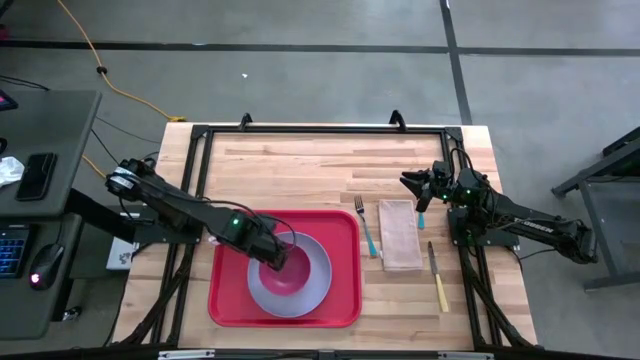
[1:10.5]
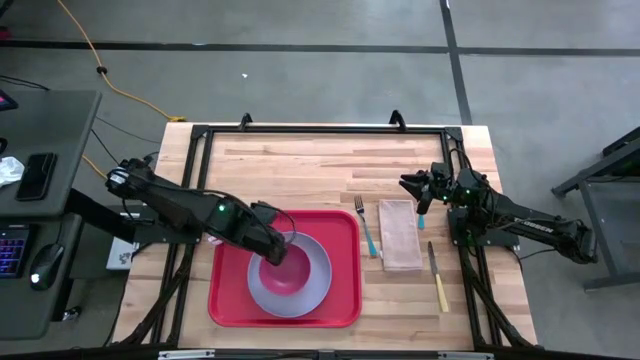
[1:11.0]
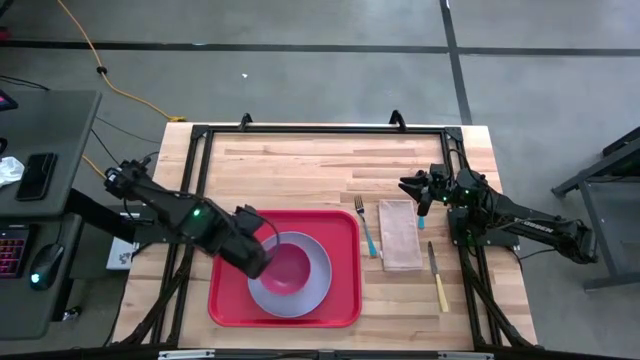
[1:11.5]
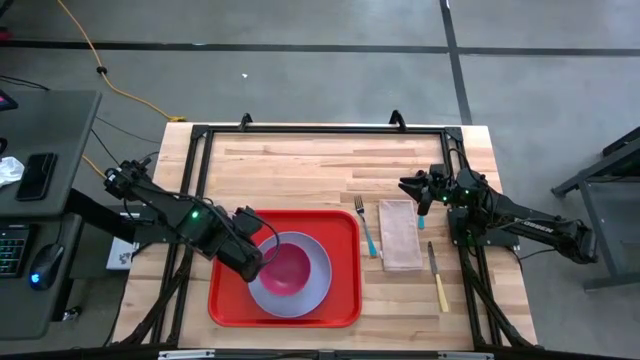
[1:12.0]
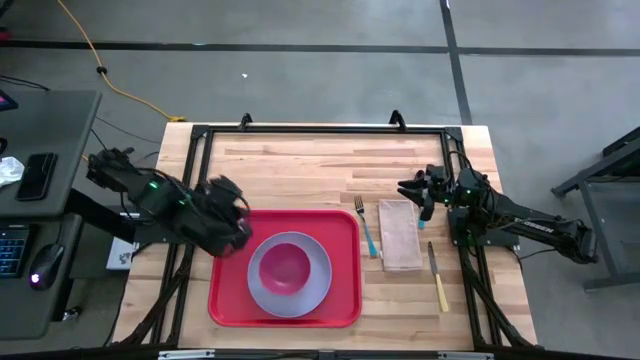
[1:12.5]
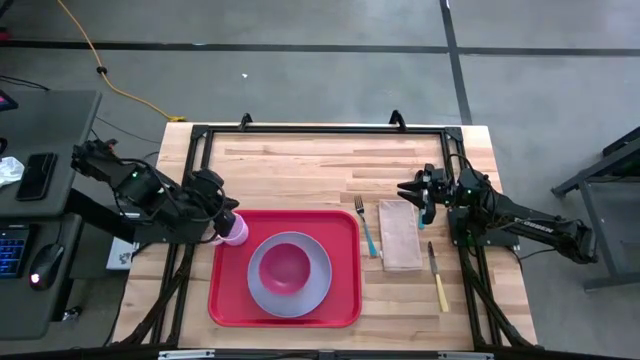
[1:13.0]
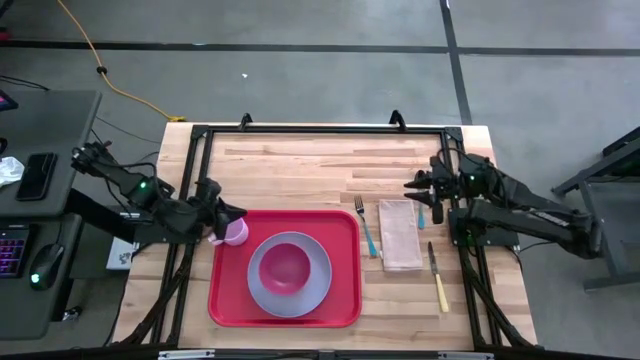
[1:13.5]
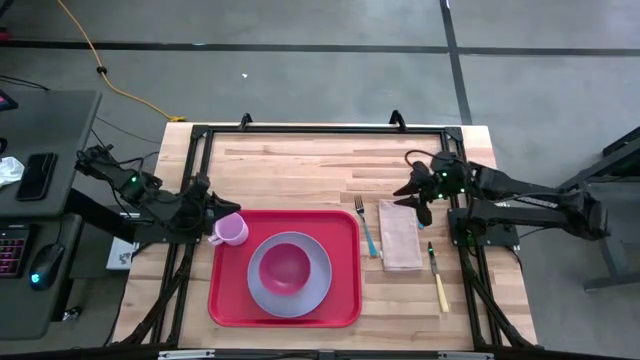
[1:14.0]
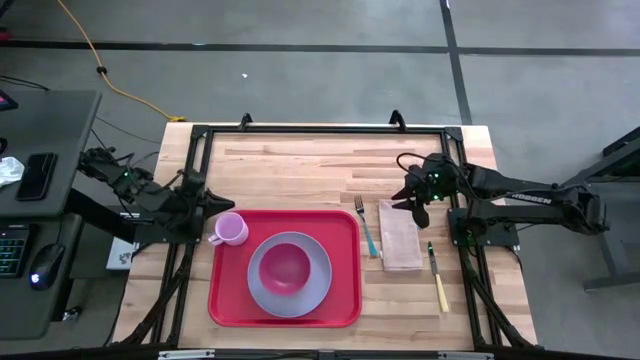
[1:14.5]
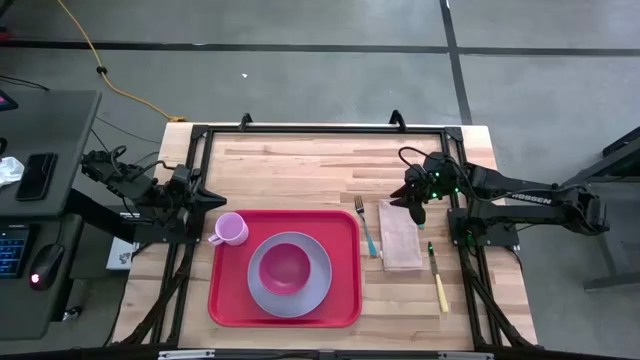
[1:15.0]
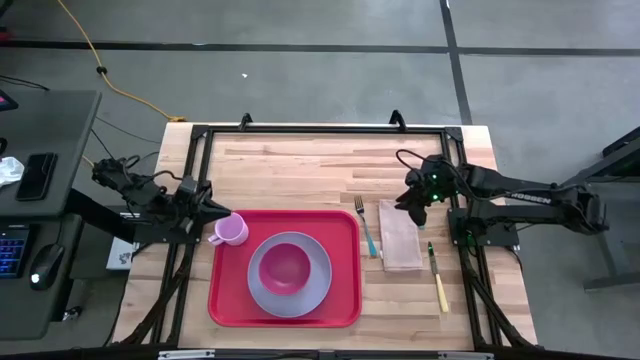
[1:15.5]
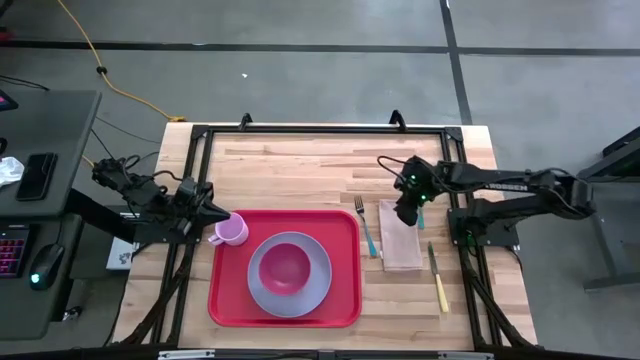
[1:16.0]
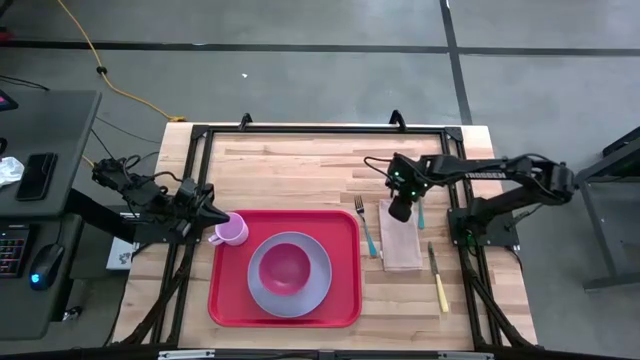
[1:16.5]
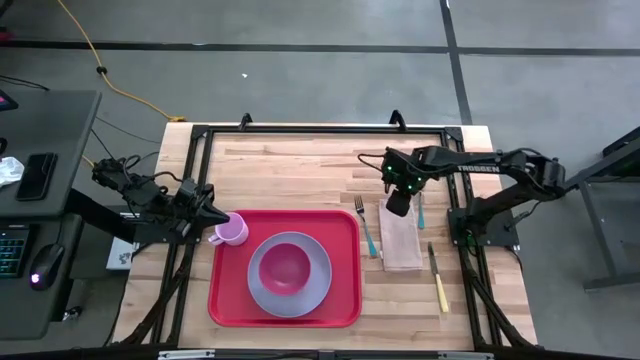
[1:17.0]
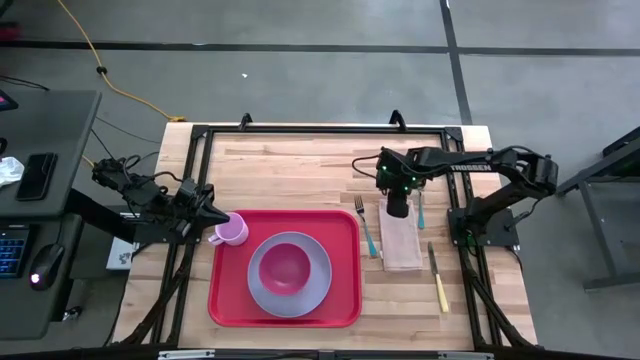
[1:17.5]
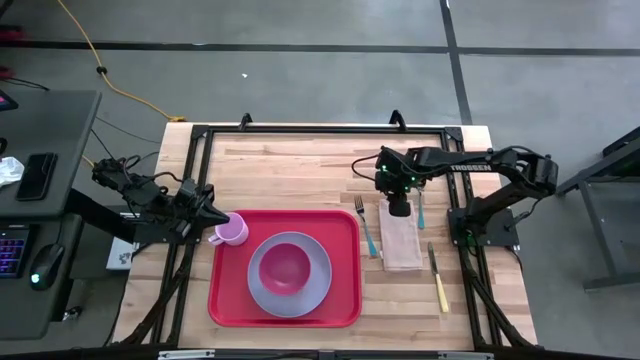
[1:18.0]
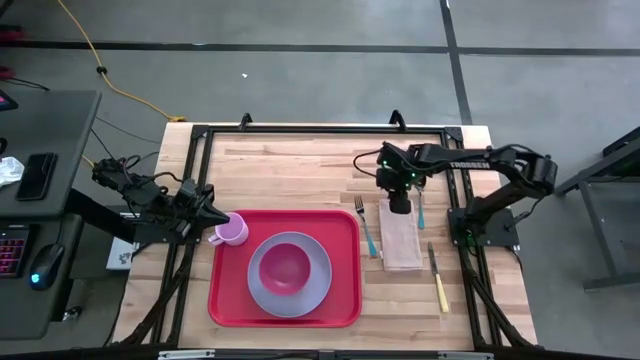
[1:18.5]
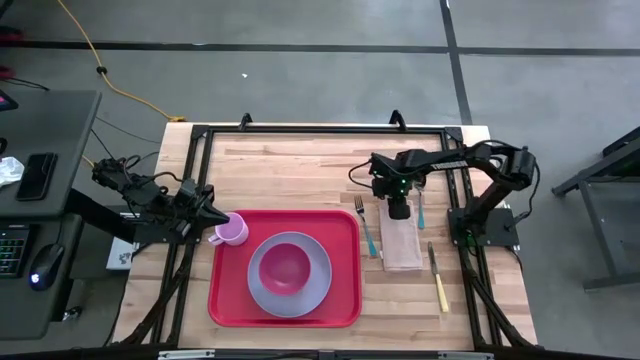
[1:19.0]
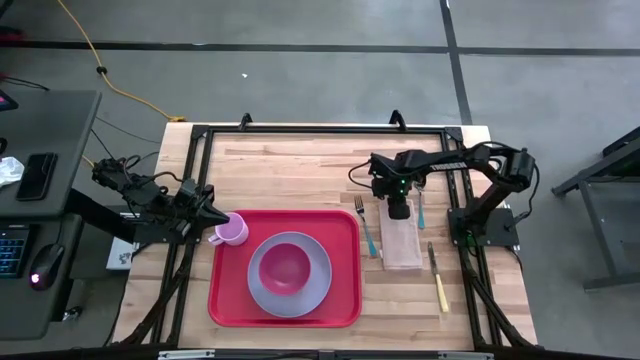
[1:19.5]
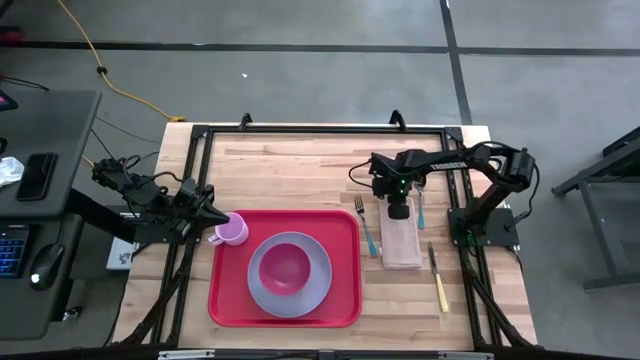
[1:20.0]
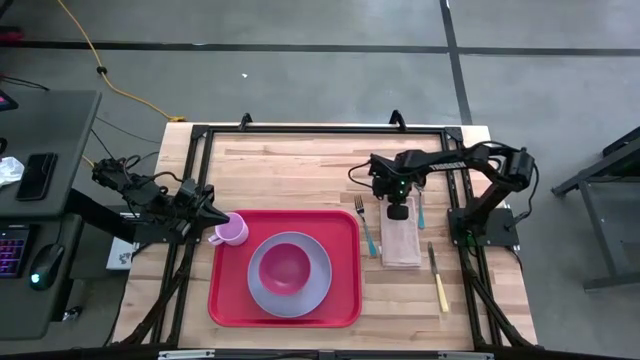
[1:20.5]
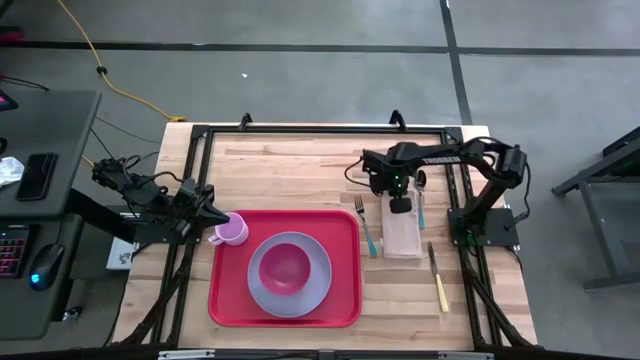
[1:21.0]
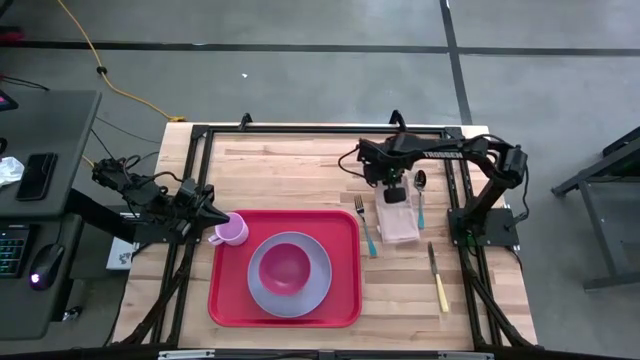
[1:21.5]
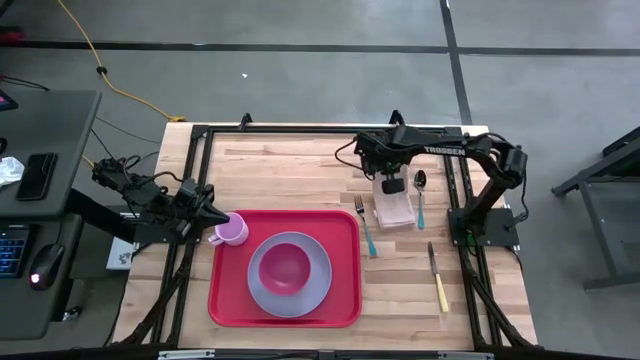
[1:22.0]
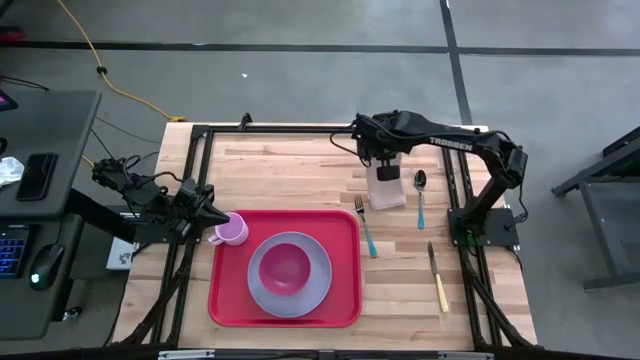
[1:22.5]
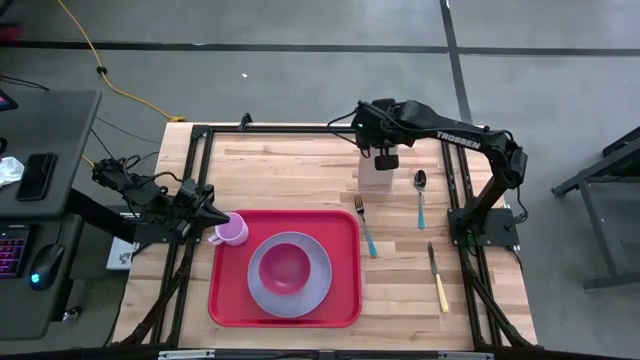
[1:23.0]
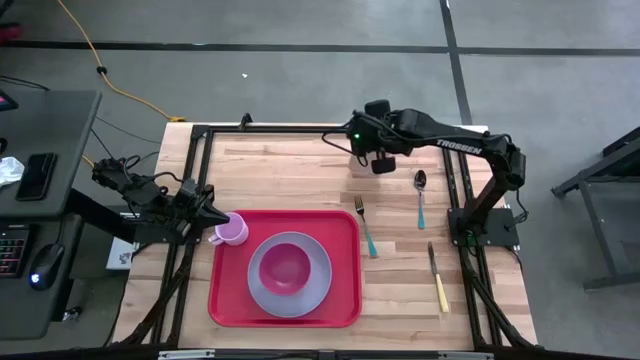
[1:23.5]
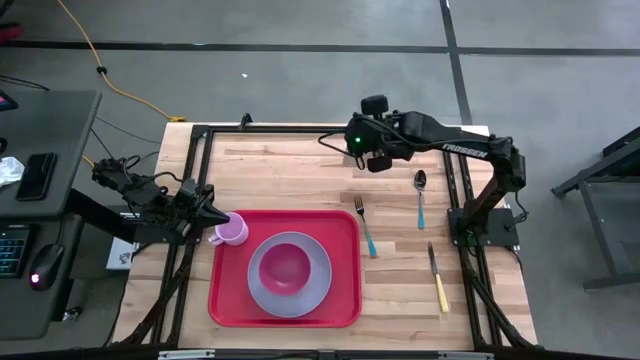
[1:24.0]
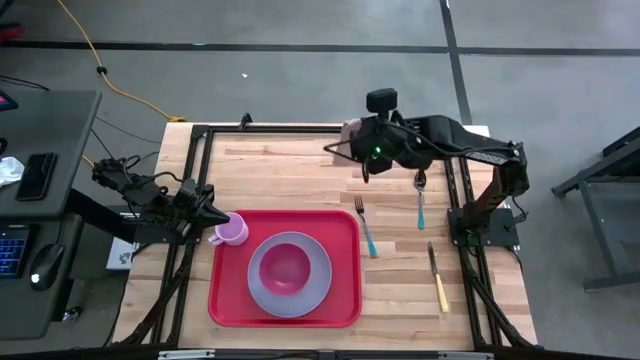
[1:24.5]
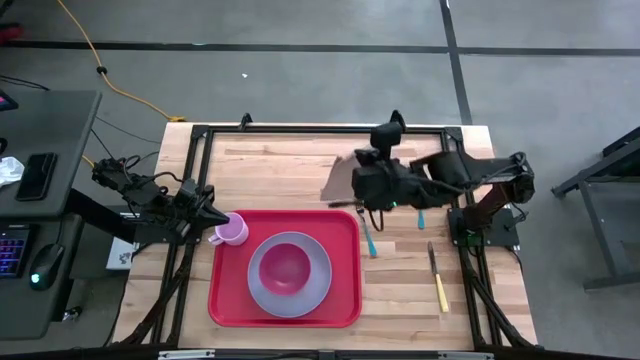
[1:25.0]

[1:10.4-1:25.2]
Task: Set up tray
Put the brown table napkin to the right of the white plate on the red tray

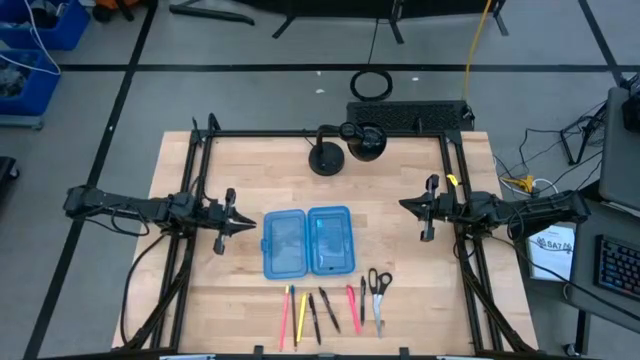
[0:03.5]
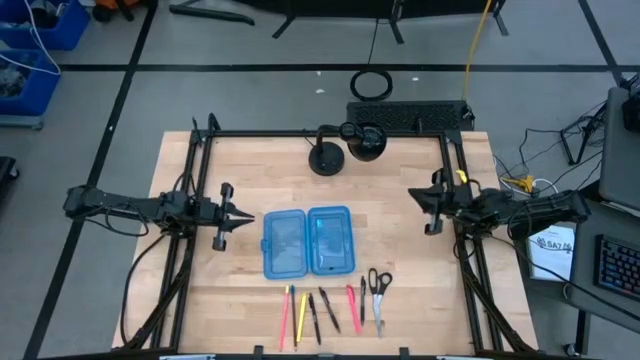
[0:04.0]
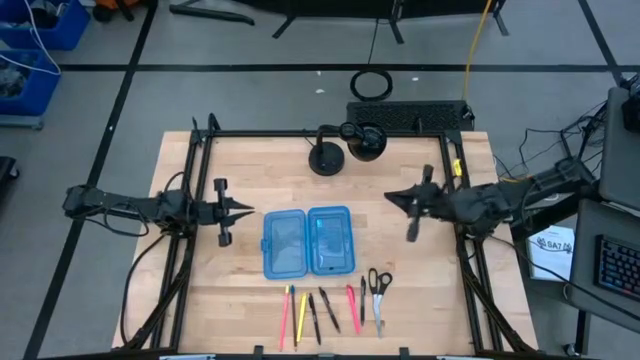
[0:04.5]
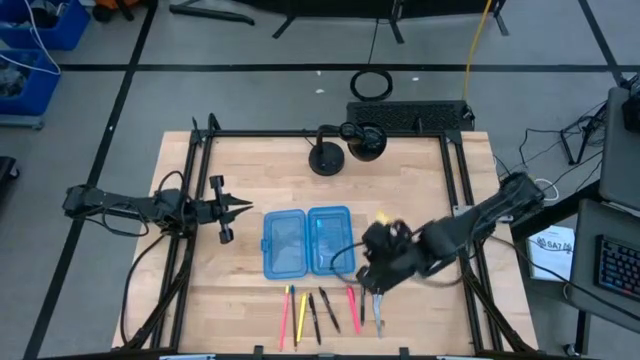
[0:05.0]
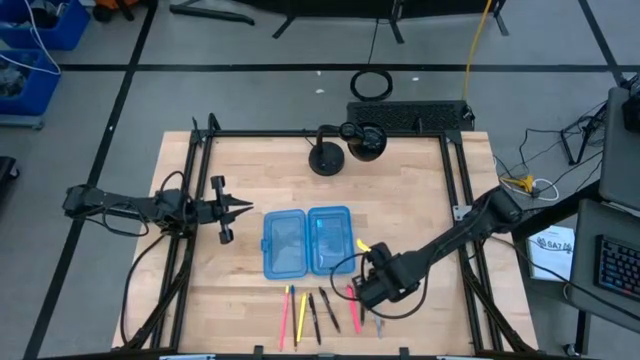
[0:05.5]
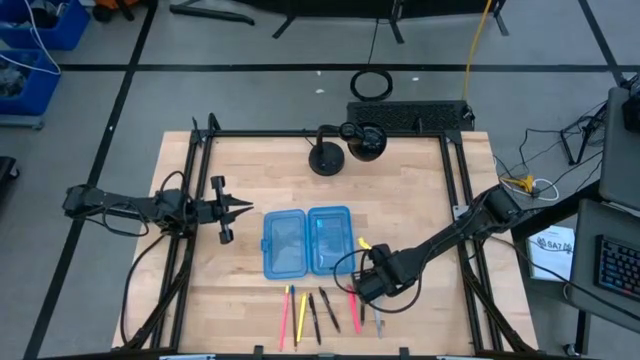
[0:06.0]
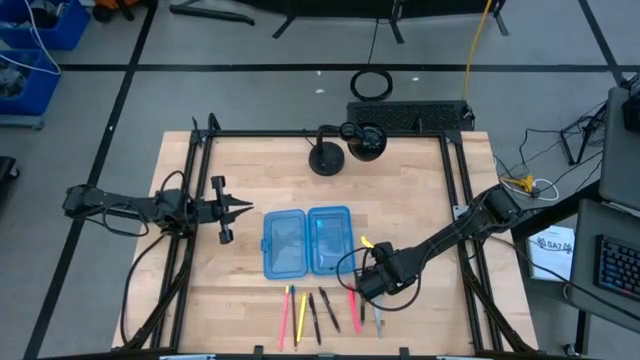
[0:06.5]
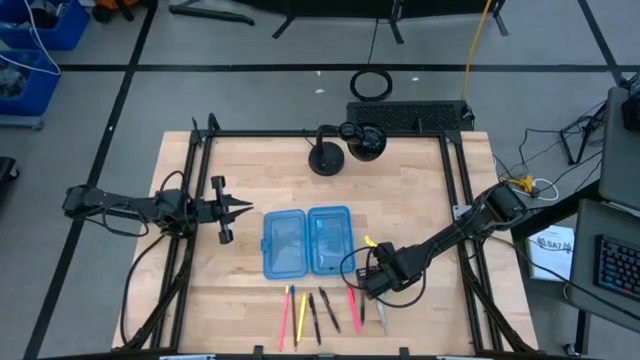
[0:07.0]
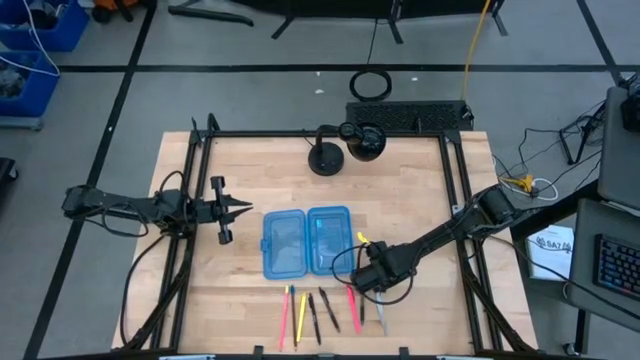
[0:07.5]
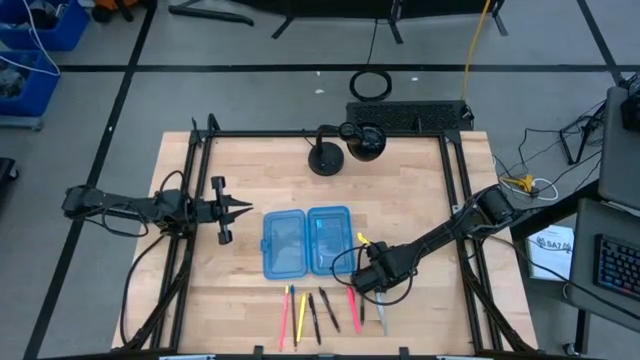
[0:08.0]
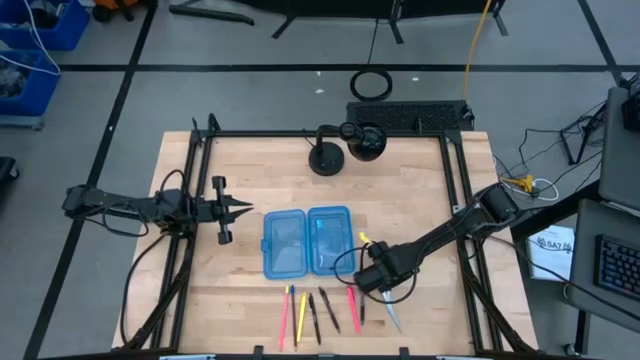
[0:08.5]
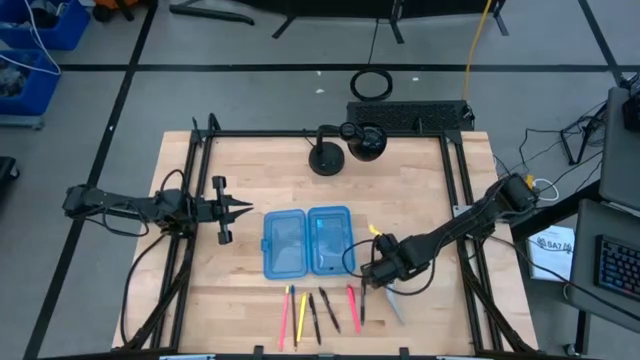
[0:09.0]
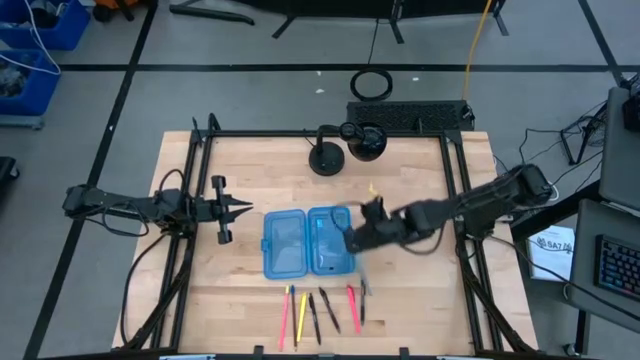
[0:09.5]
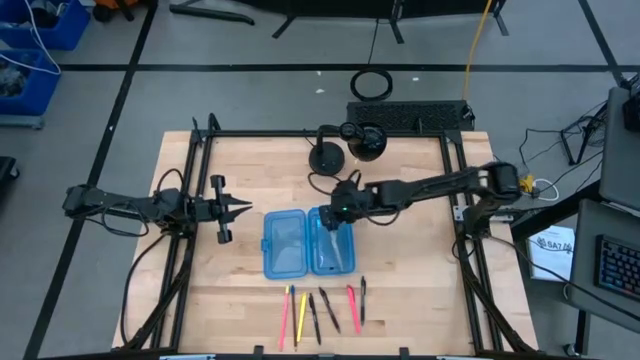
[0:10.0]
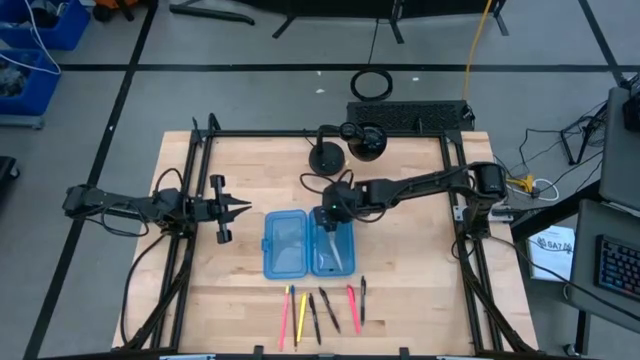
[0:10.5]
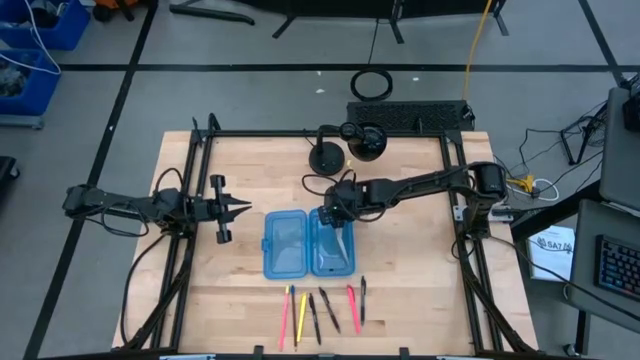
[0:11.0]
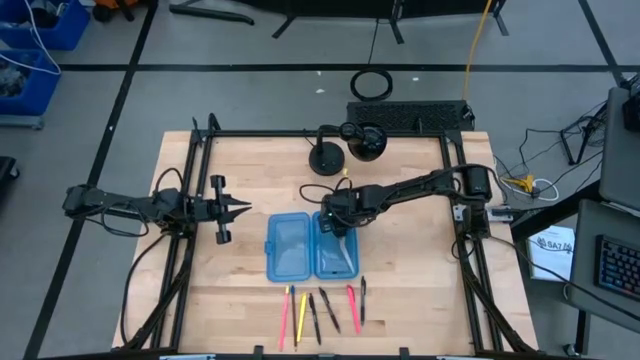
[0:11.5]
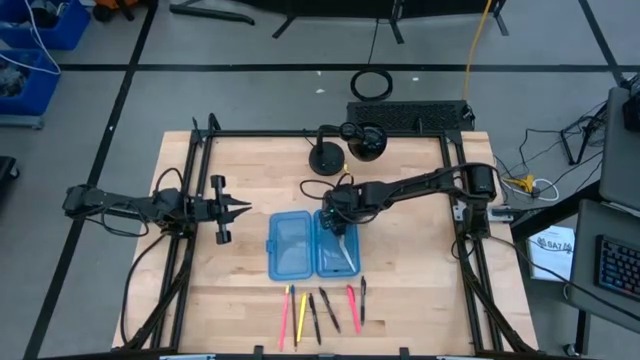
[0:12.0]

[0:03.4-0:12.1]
Task: Pick & place school supplies into a supply box
Put the black scissors into the blue supply box
